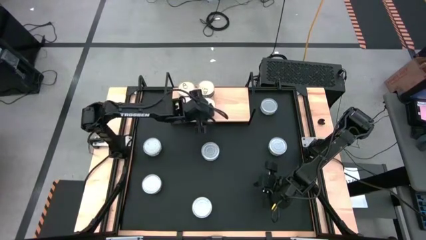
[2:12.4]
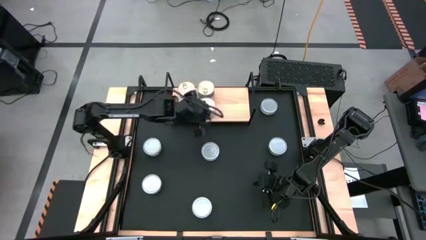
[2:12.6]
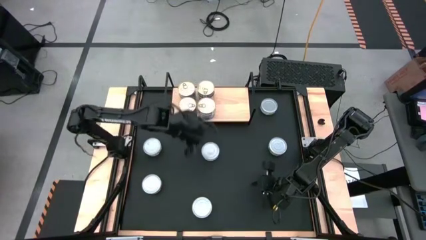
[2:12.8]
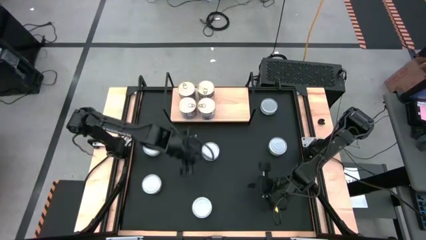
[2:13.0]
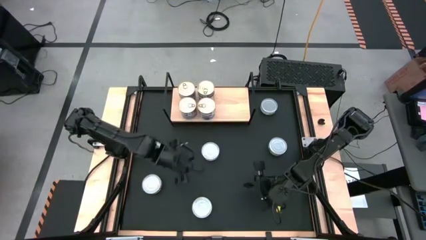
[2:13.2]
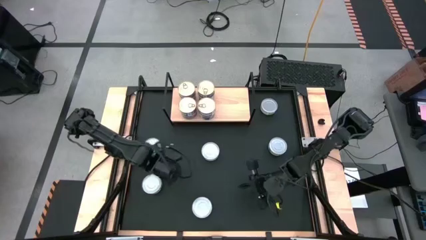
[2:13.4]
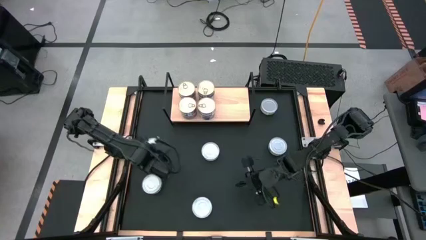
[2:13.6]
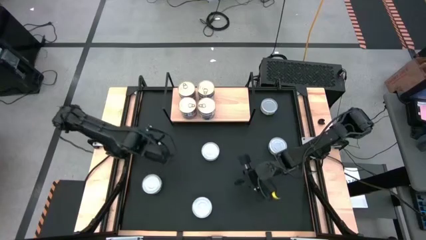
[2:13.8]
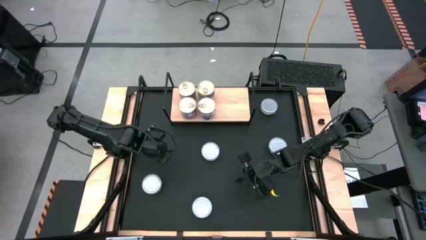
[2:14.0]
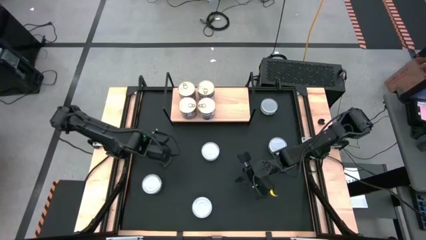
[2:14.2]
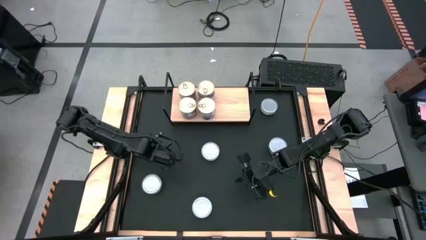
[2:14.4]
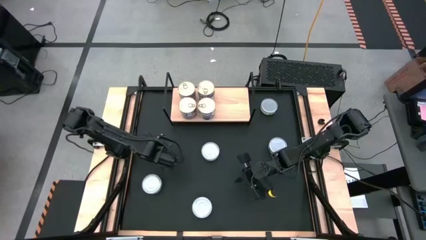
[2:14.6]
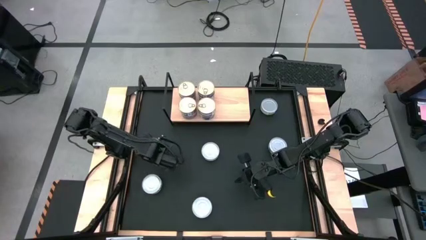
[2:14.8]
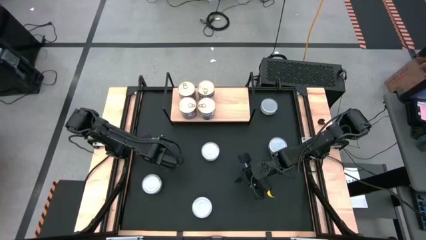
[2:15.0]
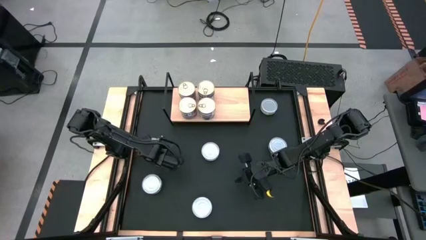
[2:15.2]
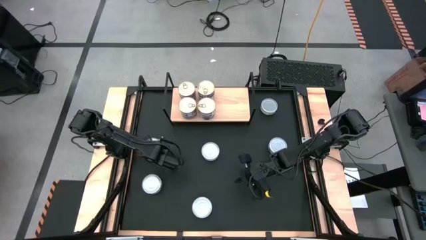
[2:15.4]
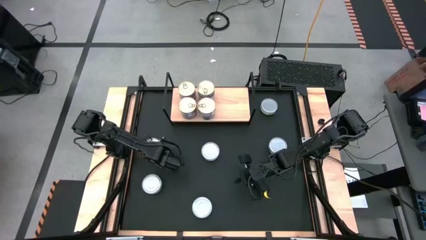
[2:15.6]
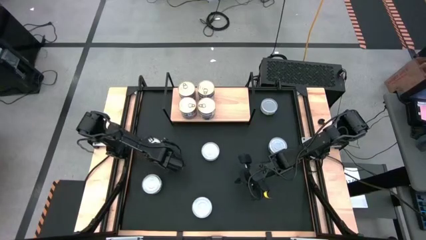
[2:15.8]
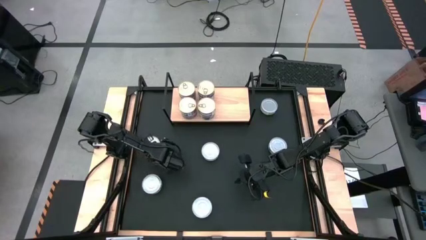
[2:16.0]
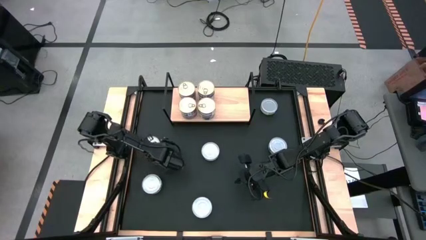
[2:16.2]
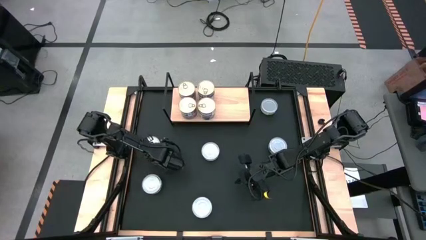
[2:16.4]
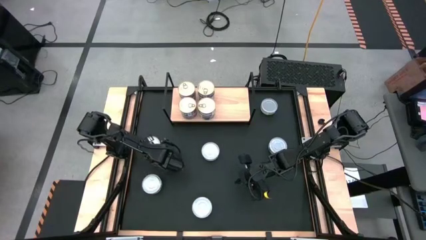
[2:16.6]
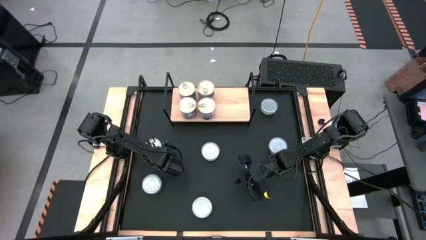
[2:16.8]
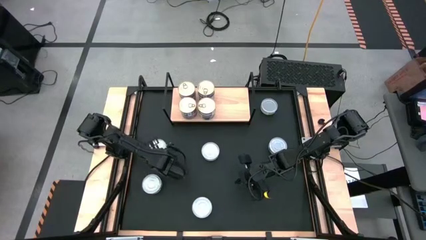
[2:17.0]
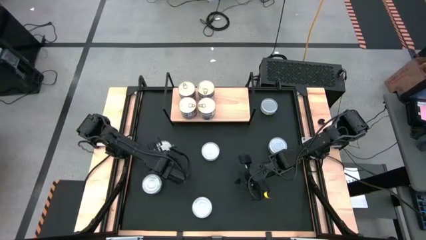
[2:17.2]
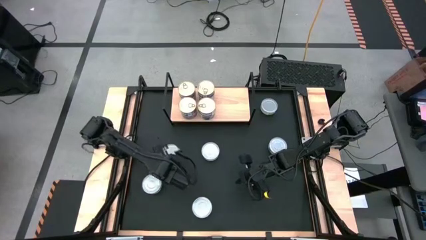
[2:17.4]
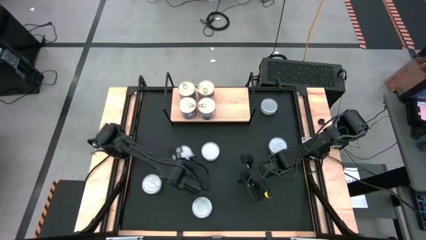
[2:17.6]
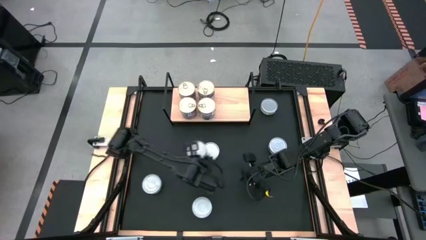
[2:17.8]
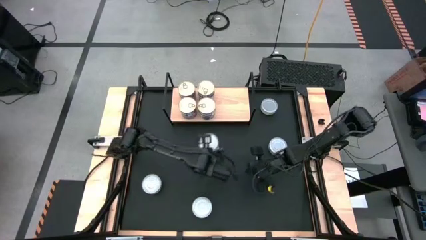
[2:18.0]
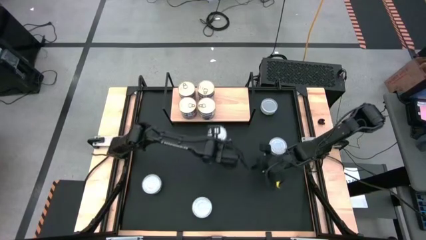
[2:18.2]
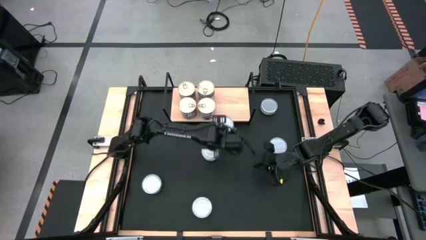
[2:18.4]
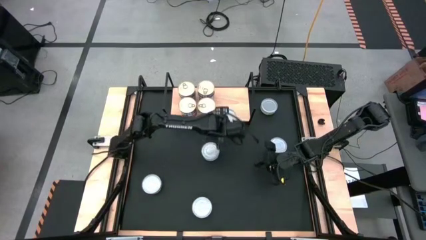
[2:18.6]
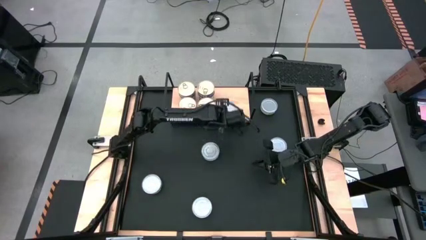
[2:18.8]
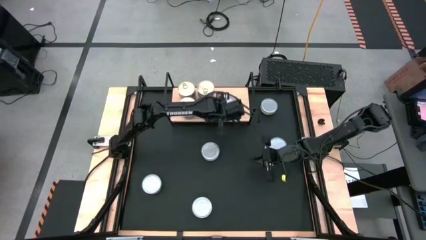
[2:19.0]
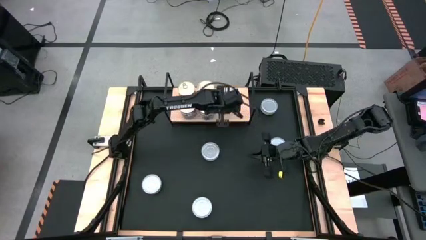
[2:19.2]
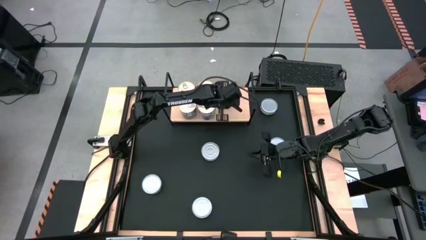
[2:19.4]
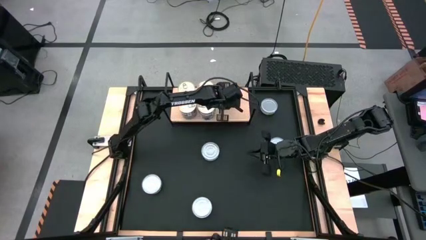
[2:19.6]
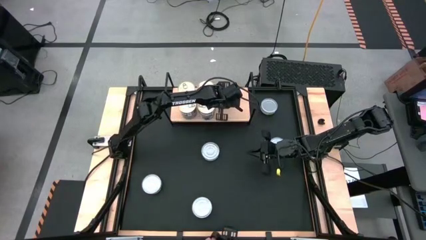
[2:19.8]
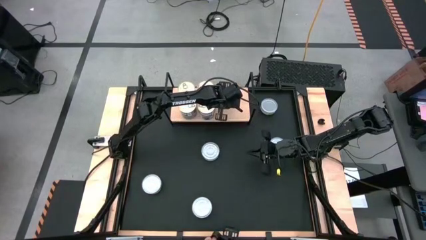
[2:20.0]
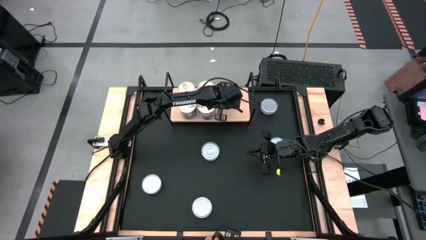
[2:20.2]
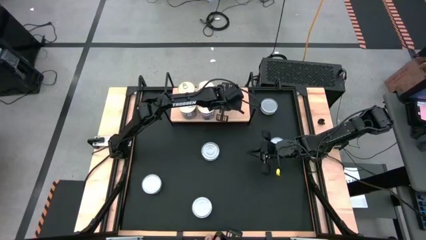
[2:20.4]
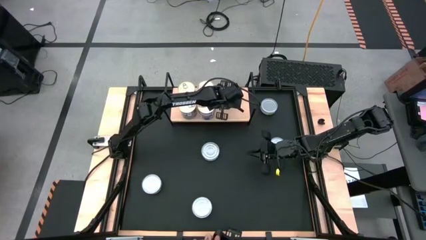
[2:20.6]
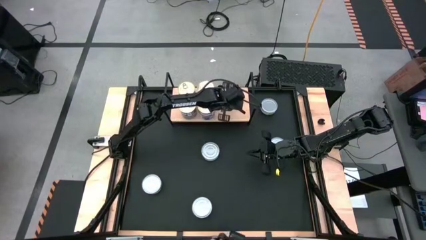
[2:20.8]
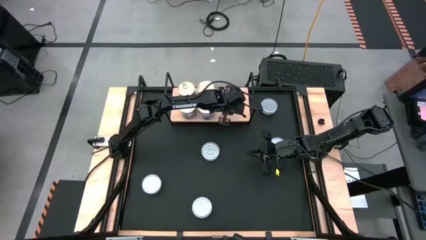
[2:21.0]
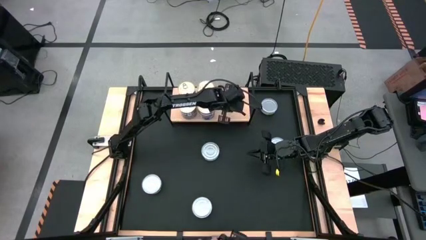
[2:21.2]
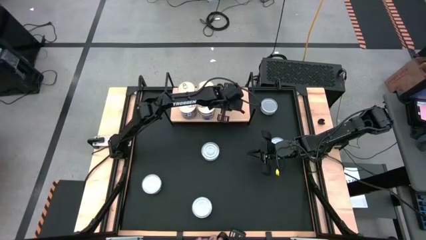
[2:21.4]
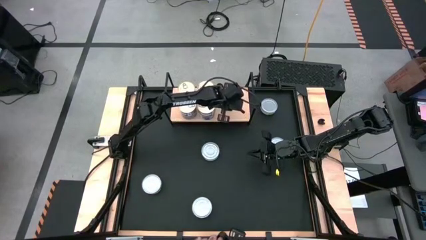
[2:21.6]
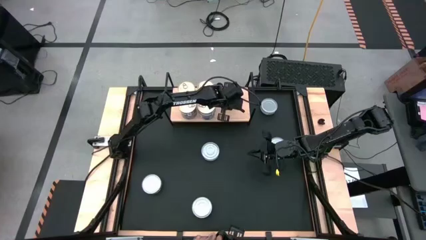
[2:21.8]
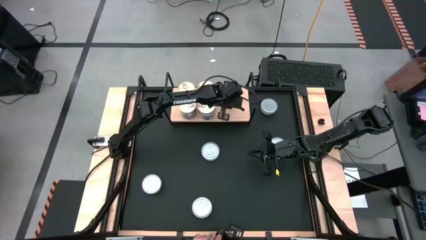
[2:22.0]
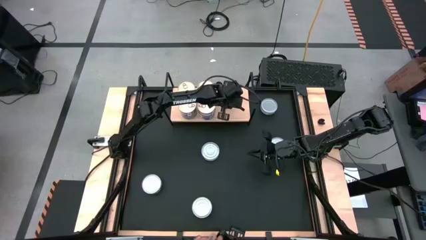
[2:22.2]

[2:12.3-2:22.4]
Task: Stack canned seafood by type on shelf
Put the green tuna can on the shelf

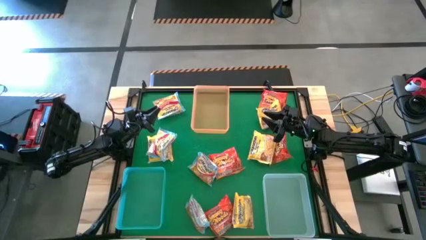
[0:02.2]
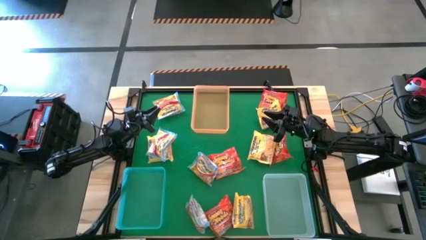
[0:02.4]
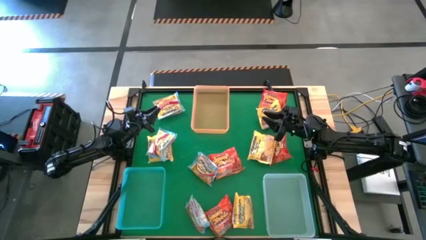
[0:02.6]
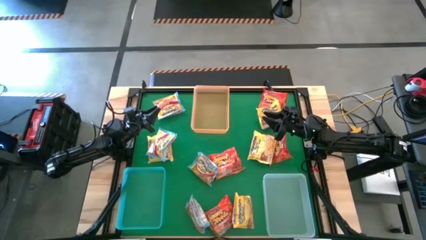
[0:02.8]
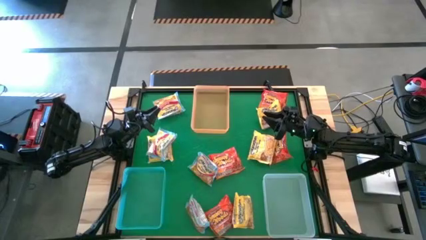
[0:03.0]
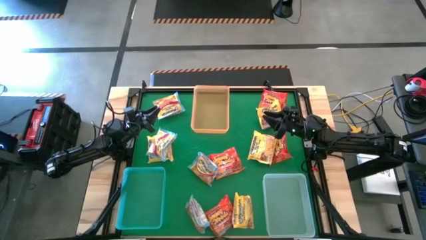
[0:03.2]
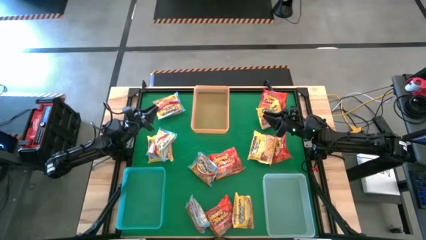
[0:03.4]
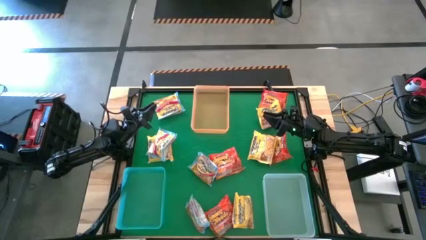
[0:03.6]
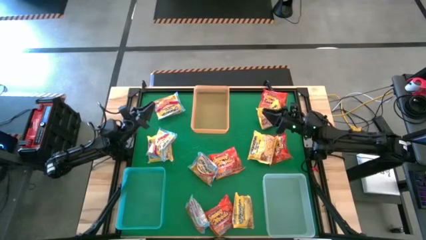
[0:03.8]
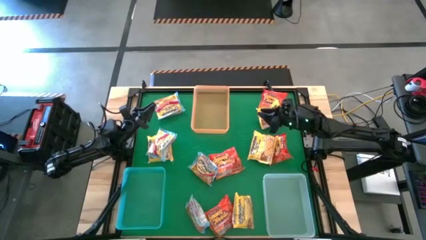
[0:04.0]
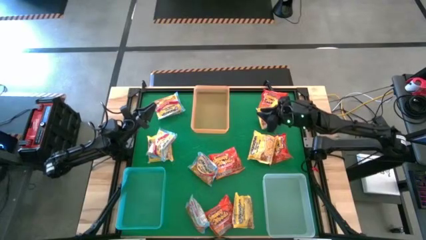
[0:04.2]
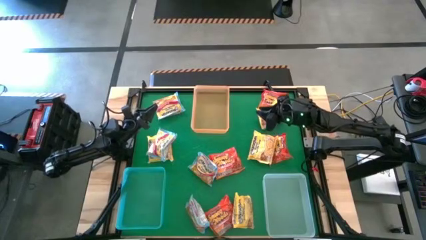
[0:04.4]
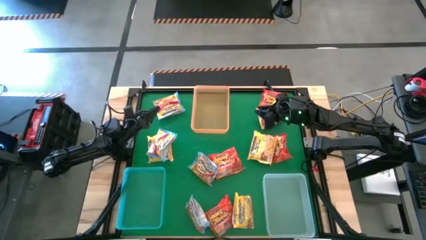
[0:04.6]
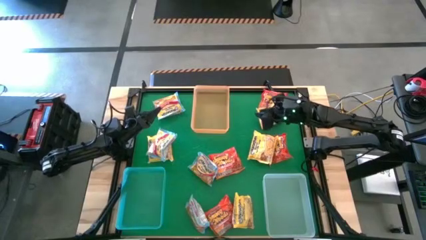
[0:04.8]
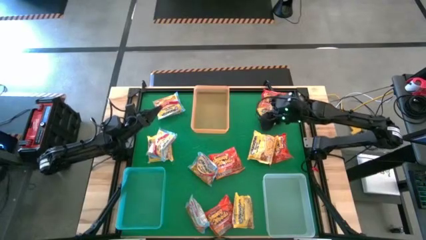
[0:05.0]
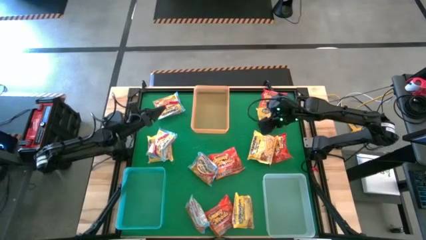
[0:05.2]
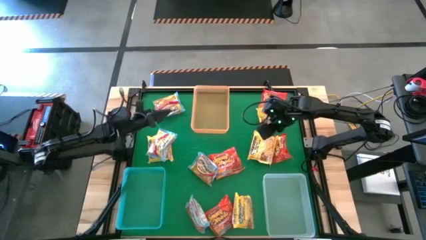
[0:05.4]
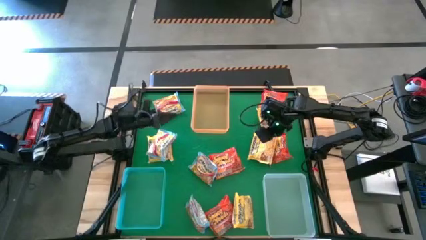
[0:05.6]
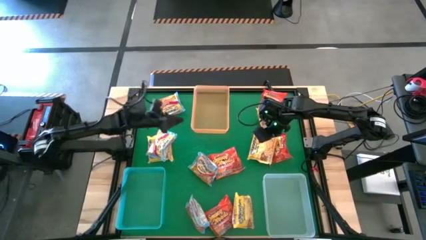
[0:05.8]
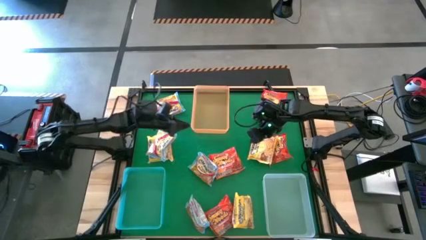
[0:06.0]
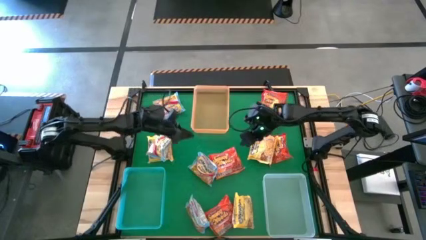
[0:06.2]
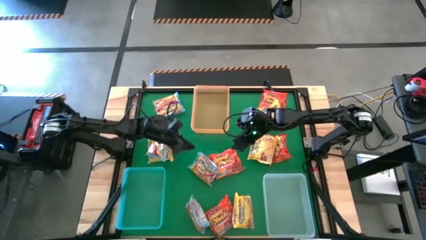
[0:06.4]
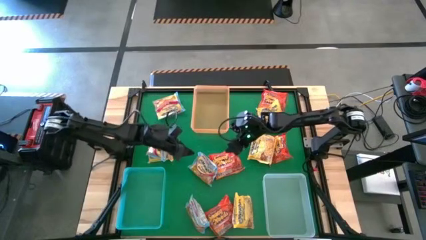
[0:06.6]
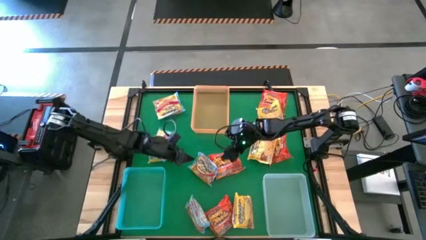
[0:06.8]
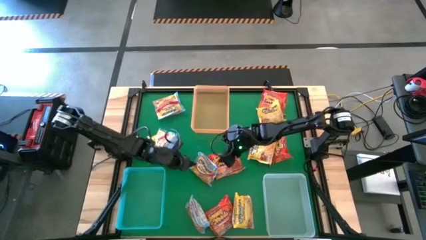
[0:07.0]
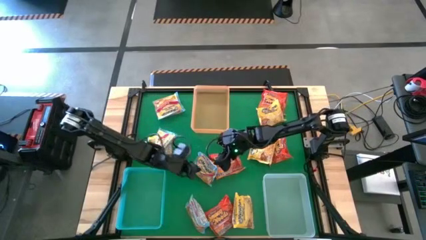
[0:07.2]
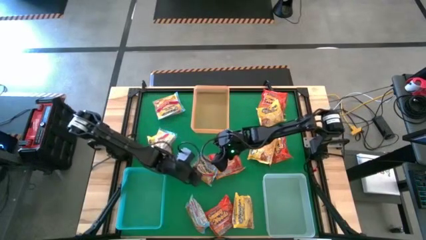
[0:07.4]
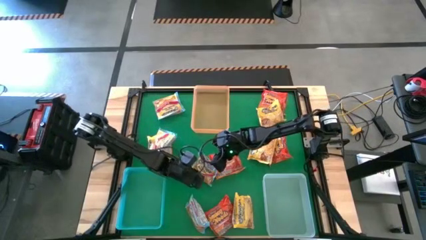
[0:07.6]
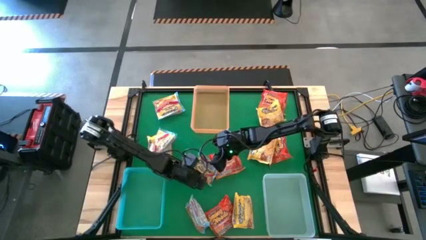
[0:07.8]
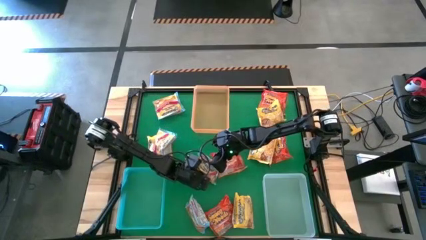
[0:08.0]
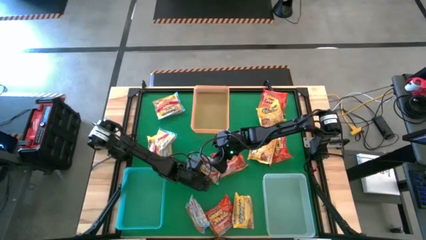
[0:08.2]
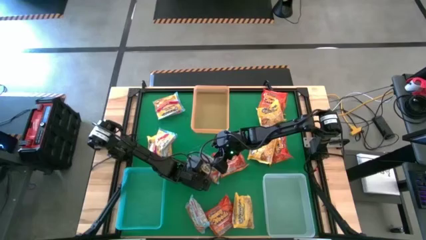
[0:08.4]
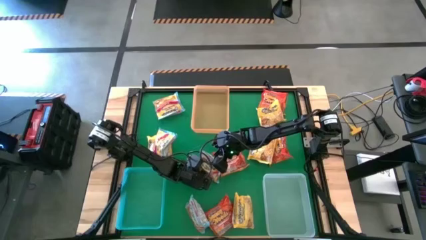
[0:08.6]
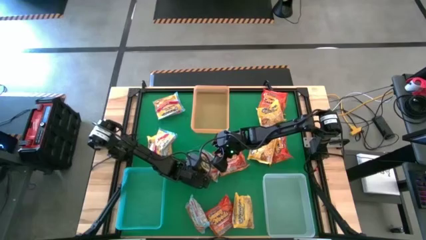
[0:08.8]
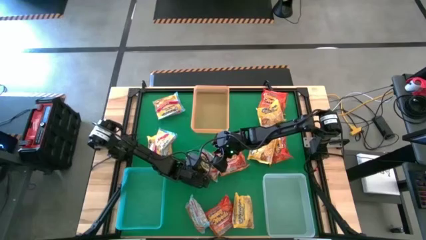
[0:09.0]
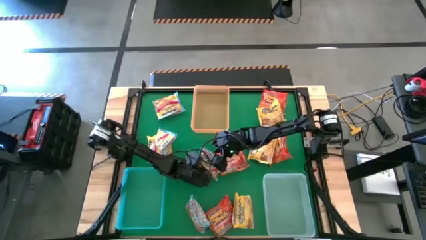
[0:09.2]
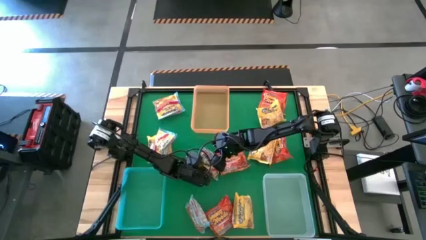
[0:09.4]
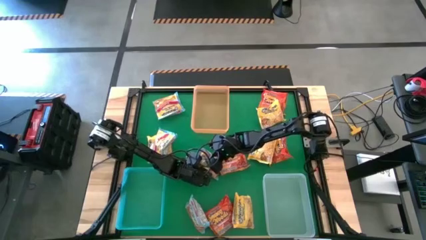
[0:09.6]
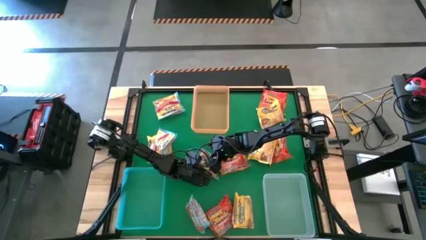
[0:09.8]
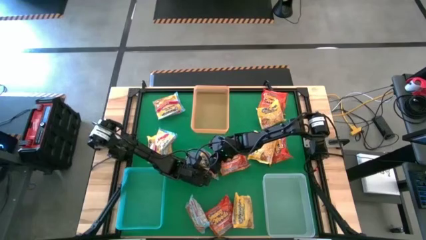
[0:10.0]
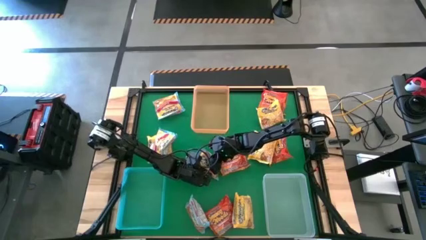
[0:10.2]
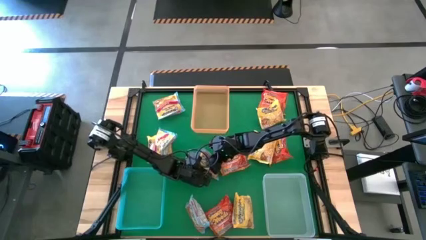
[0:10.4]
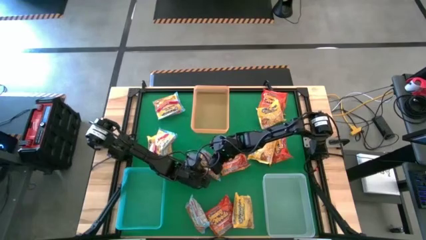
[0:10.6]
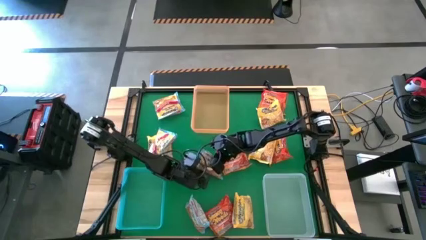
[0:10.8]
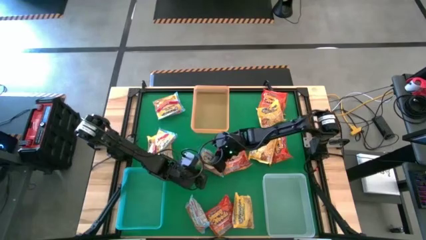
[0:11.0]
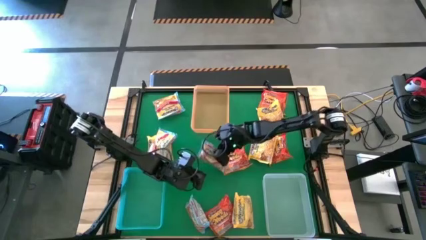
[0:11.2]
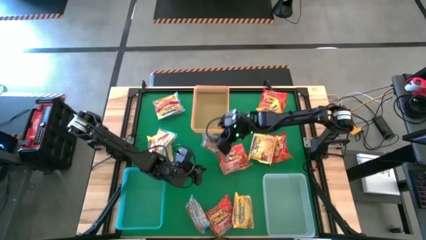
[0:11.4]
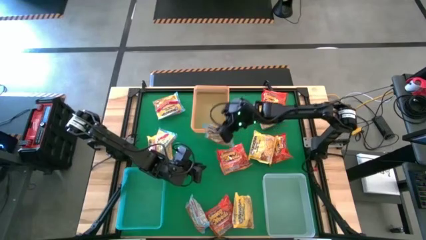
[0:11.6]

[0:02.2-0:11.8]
Task: Sort Maruchan noodles
Put the blue noodle pack into the yellow bin
